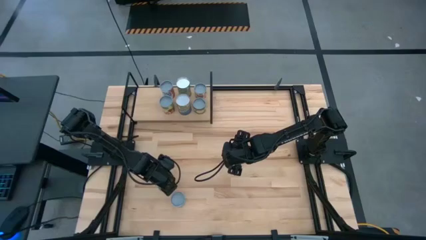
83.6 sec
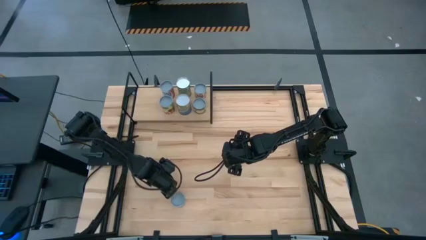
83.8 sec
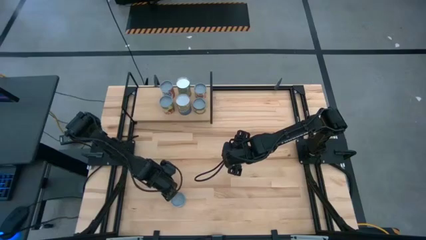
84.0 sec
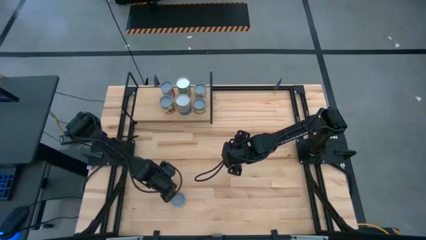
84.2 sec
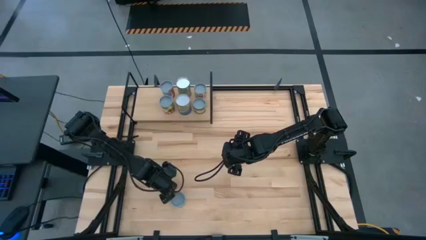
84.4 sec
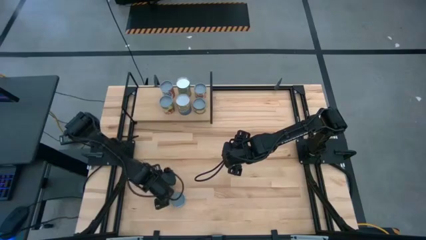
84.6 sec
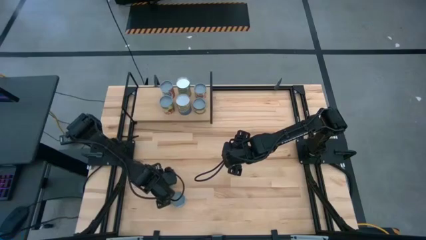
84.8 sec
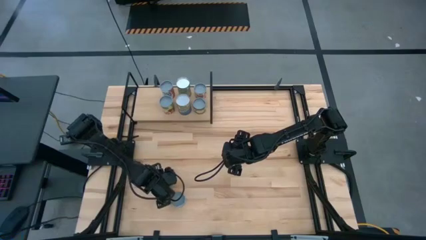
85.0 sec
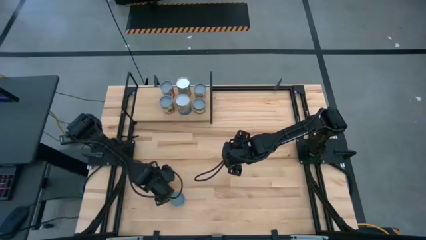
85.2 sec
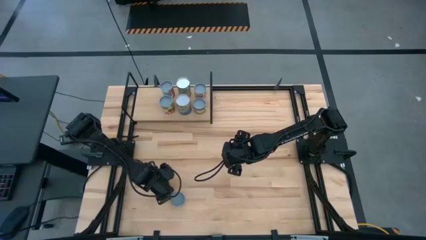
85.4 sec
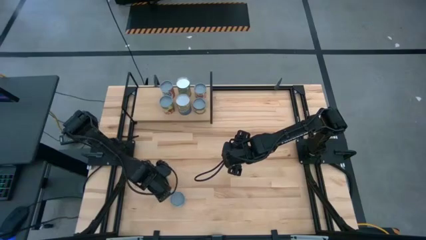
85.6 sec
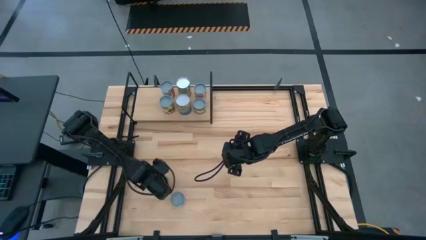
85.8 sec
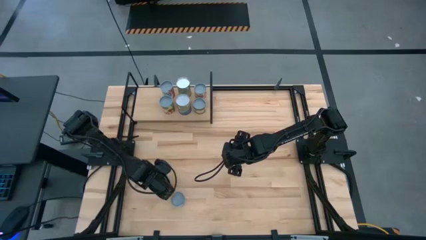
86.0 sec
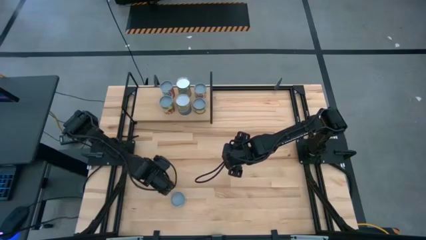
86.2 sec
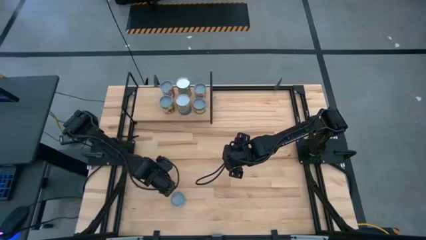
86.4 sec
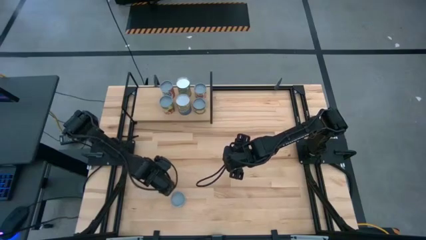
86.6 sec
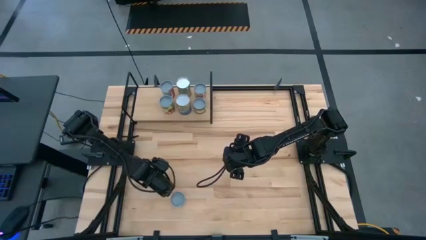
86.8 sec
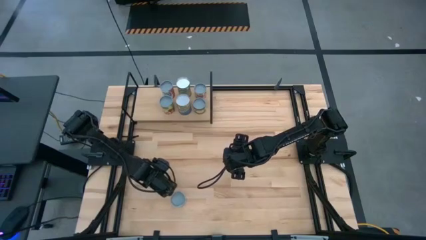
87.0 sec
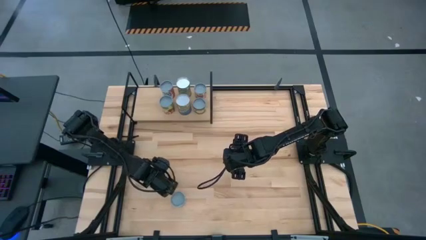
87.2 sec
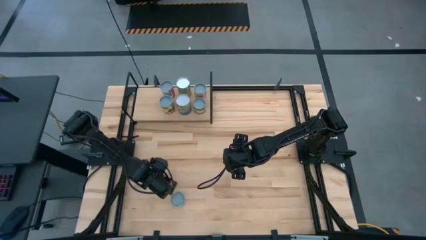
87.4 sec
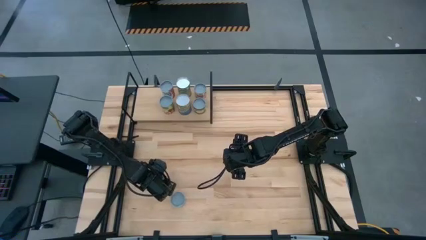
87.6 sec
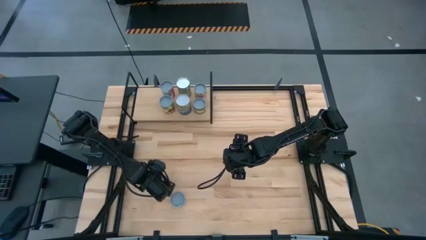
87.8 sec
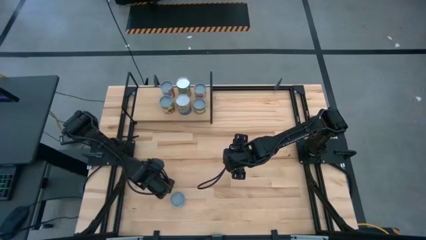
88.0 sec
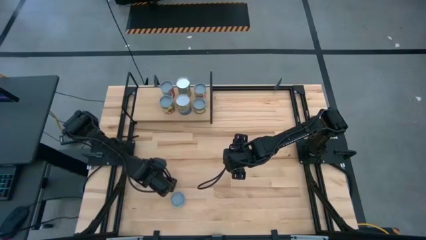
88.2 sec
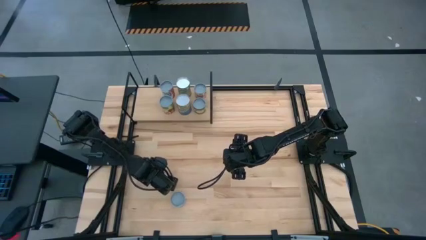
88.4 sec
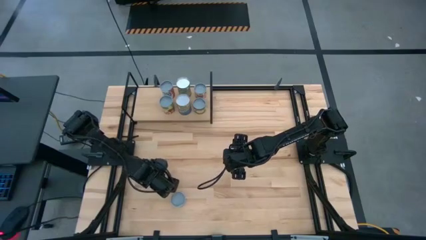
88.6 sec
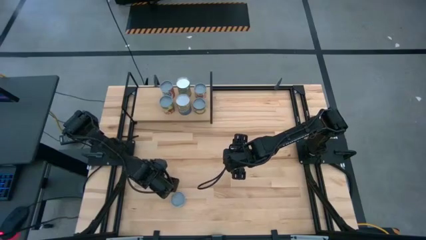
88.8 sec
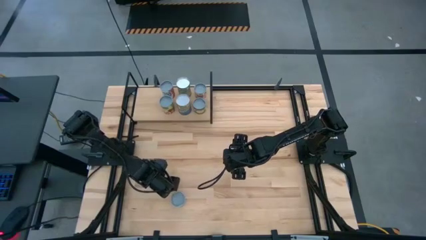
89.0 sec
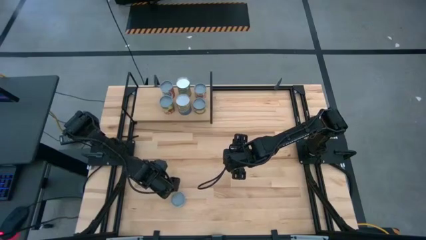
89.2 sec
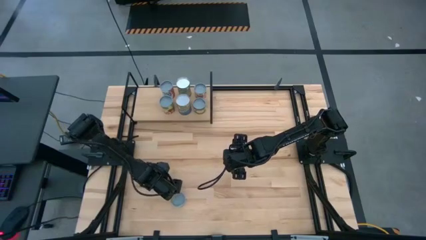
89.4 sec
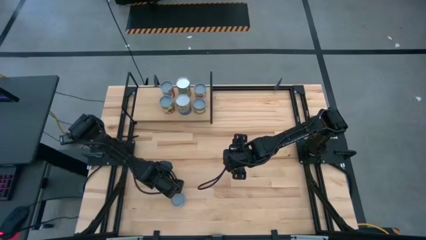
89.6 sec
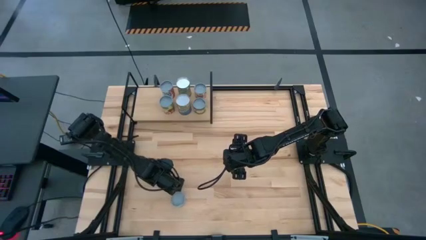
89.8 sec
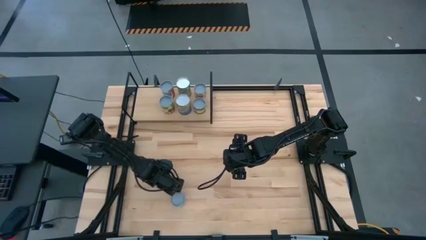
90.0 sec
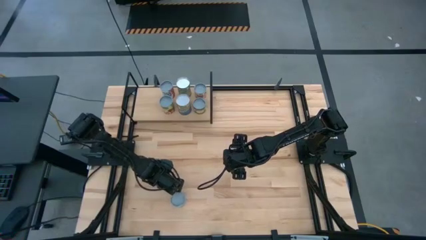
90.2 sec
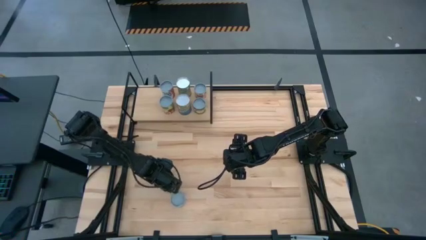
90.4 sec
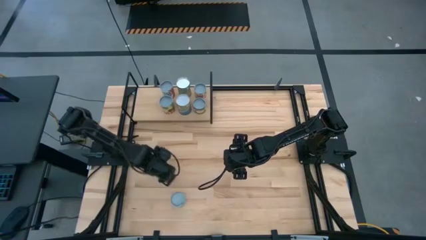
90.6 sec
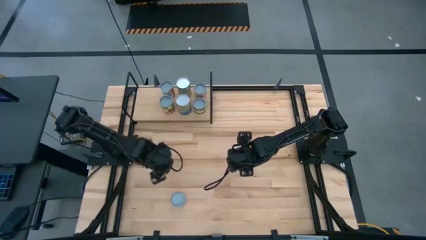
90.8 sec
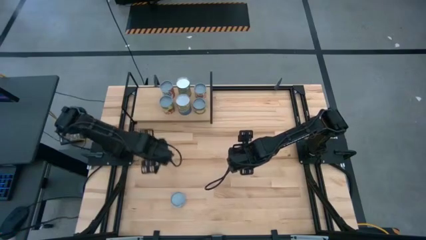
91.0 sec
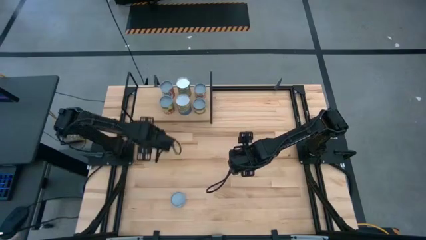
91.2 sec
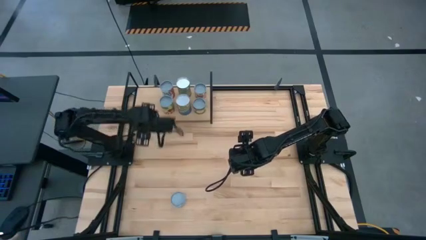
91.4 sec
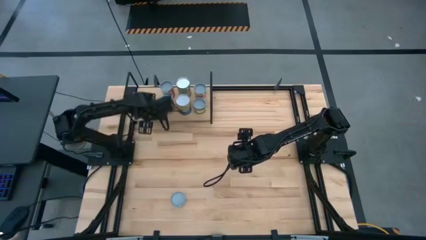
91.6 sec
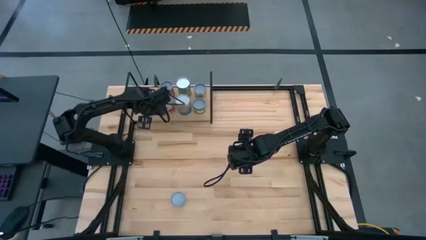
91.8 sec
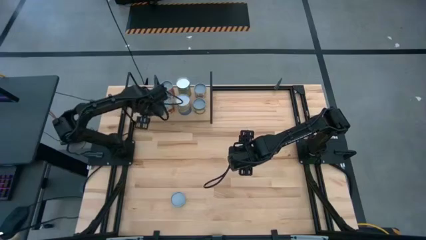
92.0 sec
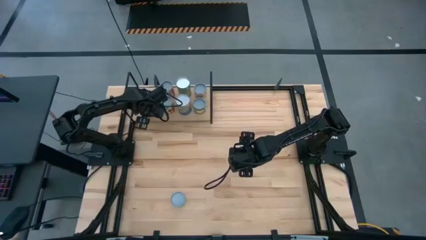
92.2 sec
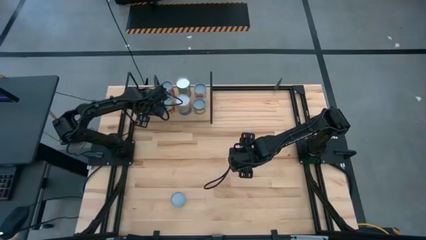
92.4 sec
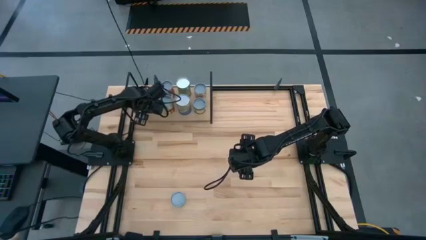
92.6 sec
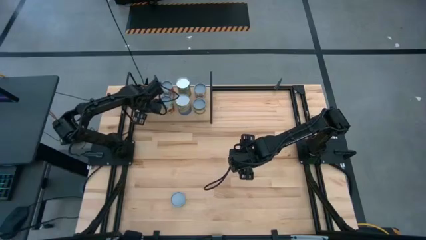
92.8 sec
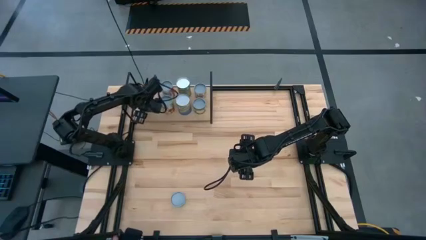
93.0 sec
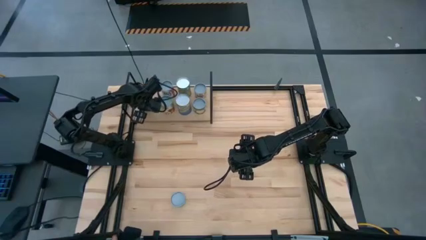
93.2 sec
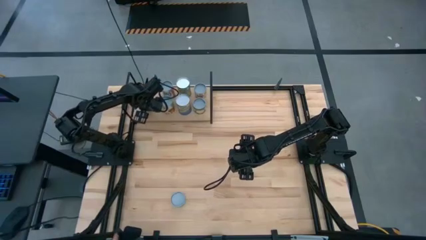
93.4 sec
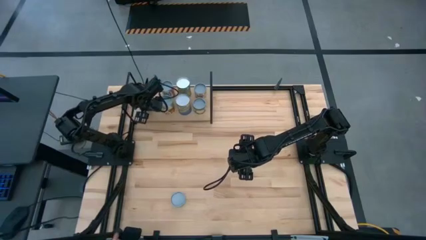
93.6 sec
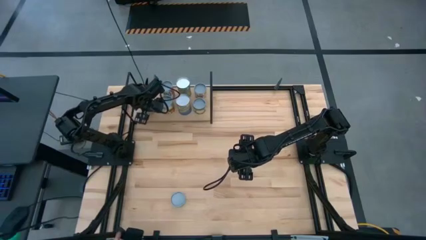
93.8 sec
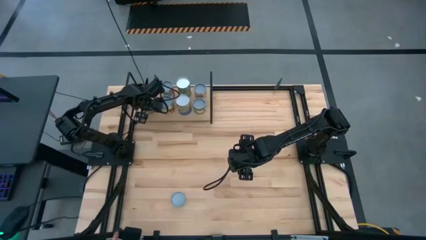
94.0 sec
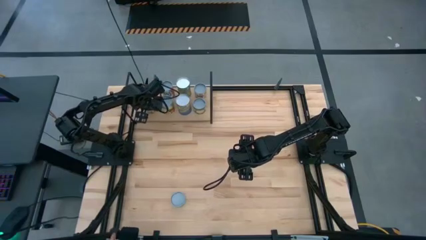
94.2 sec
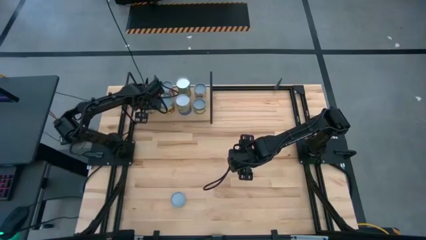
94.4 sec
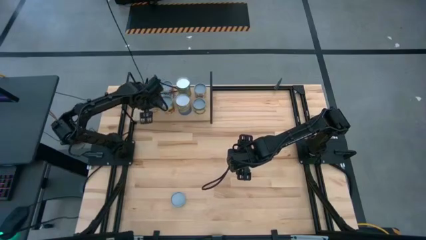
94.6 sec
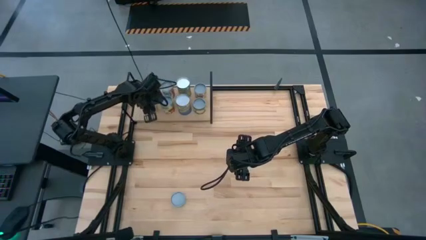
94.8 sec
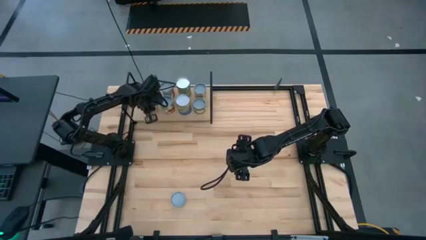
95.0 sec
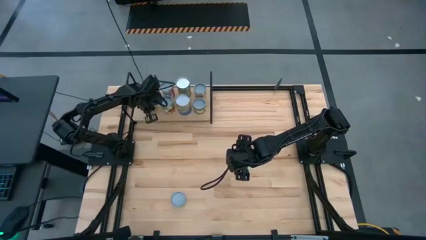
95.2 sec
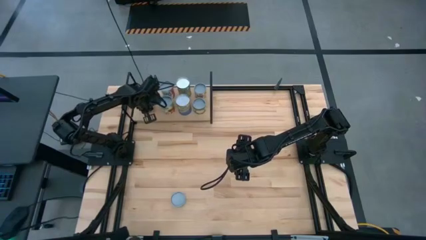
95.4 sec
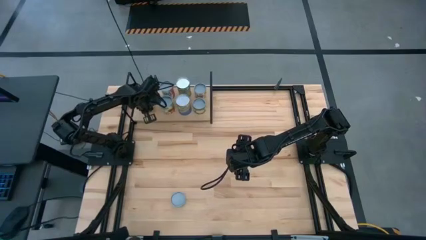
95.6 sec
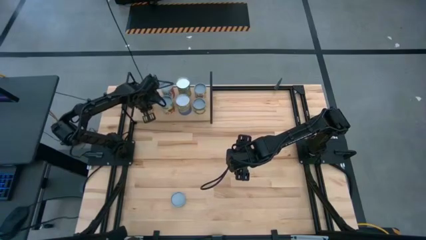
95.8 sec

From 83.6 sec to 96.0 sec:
Task: Pick and place cans onto a shelf
Put the canned tomatoes on the shelf

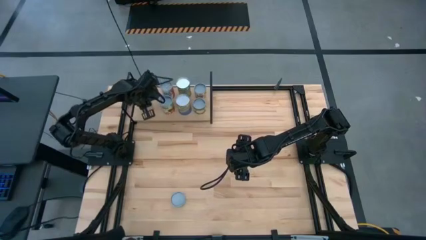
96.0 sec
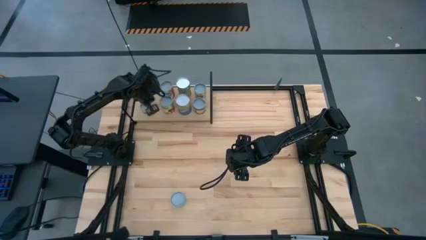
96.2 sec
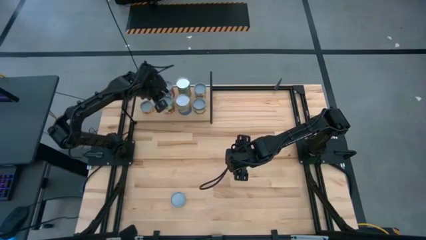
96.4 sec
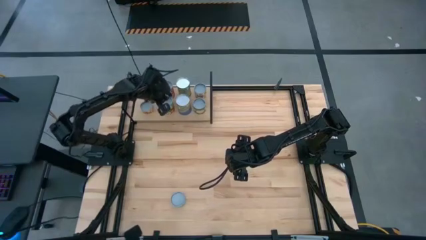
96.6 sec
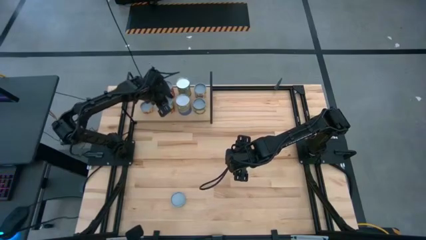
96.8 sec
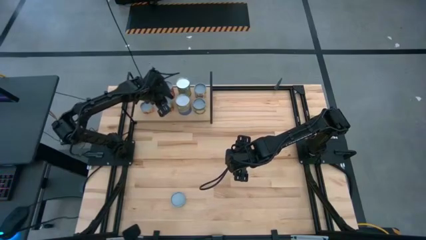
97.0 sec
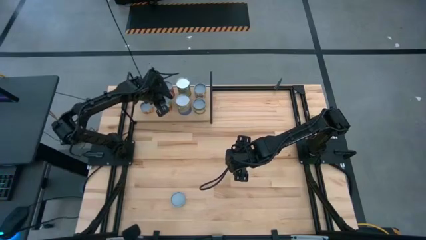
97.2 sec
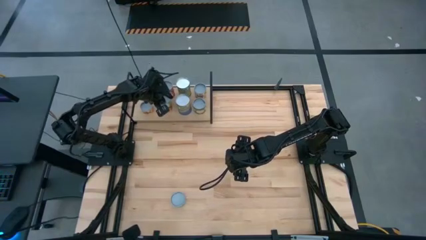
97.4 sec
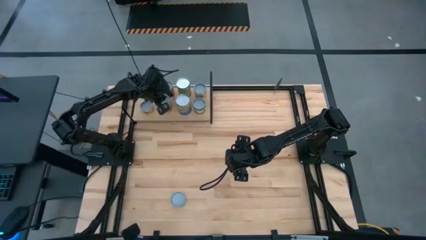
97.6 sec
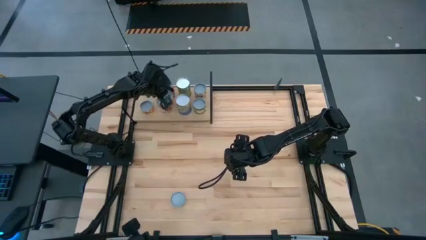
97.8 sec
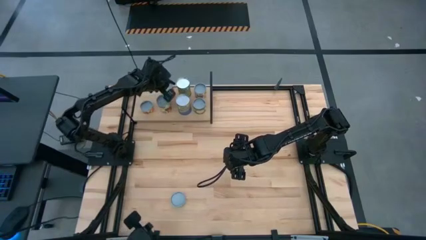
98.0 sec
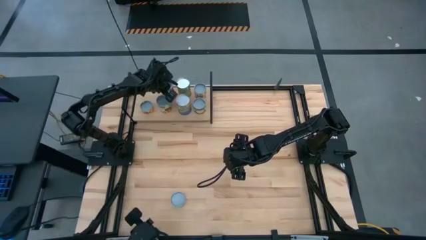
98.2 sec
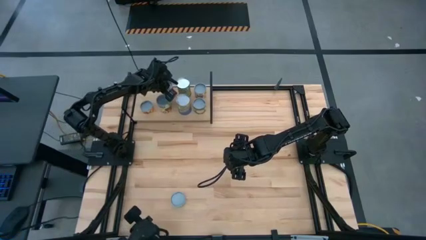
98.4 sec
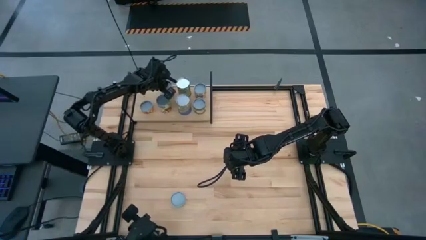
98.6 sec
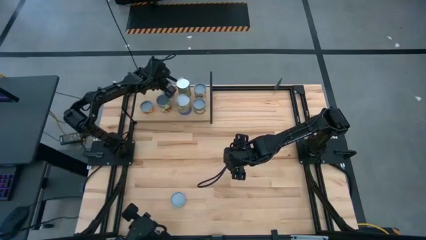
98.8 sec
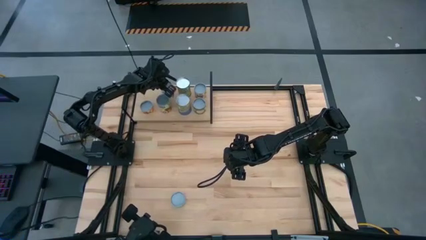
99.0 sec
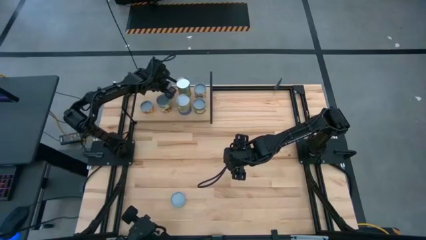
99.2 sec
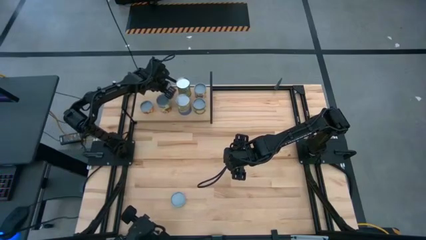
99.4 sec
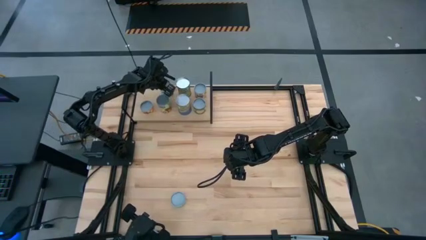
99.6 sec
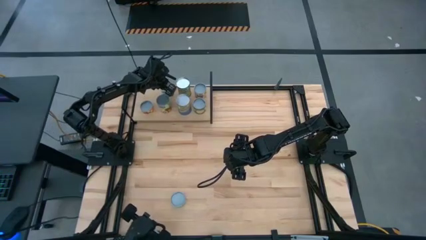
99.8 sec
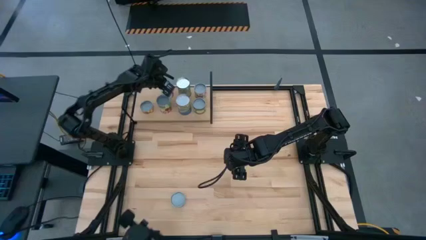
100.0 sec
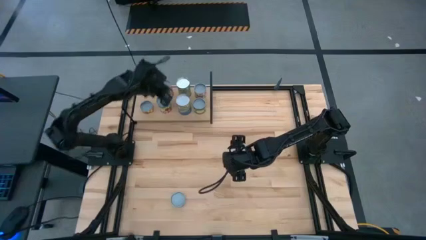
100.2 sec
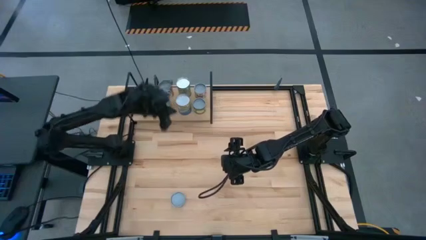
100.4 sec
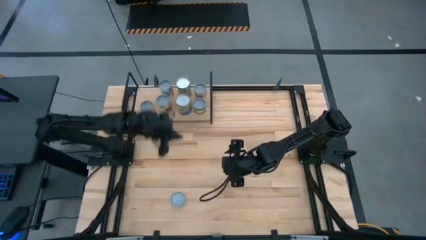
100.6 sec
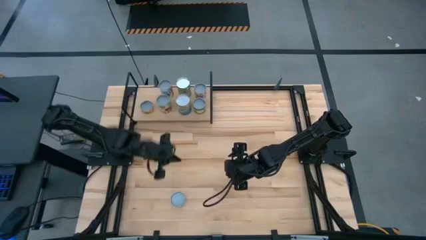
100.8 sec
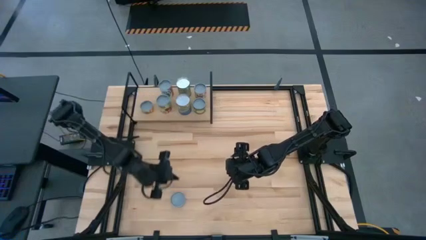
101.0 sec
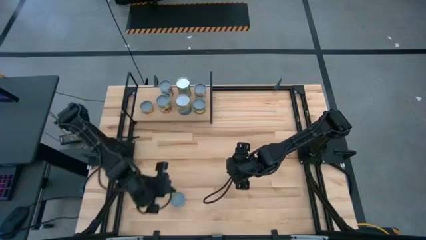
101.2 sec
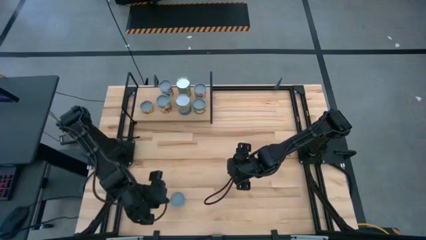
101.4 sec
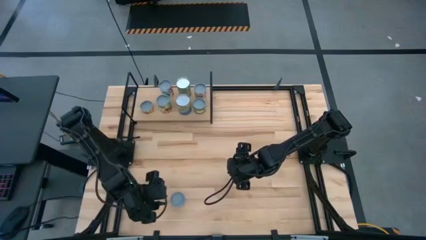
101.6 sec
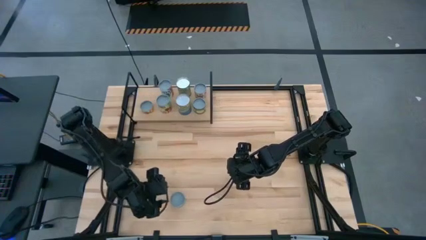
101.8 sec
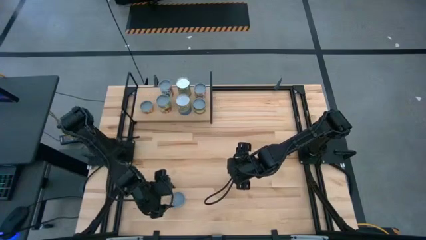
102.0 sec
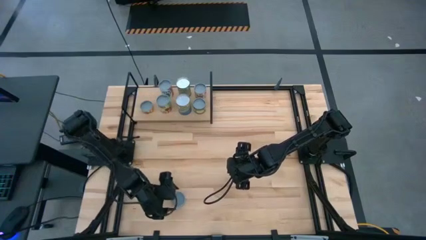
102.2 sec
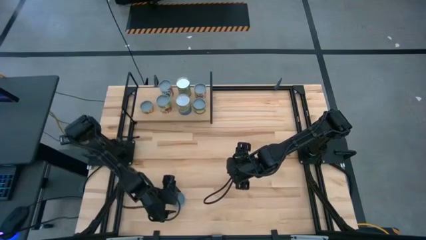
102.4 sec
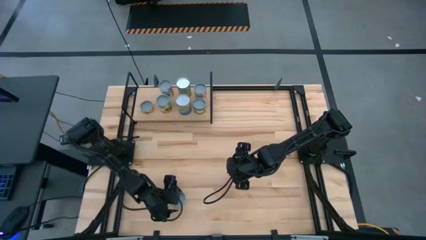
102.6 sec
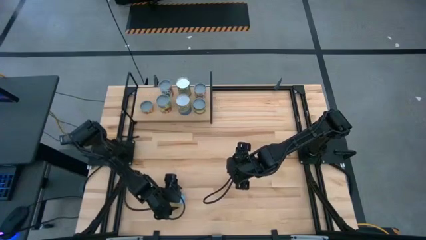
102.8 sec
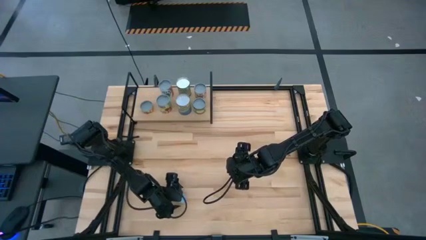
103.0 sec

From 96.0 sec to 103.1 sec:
Adjust the canned goods on the shelf
